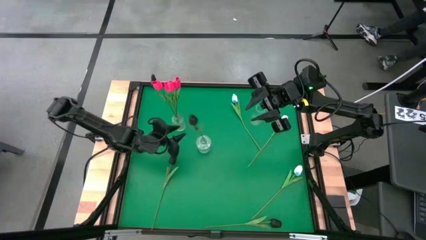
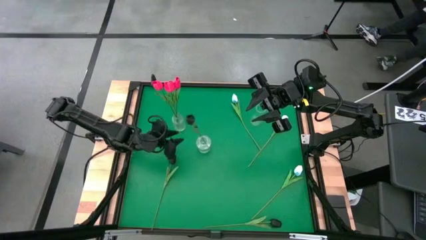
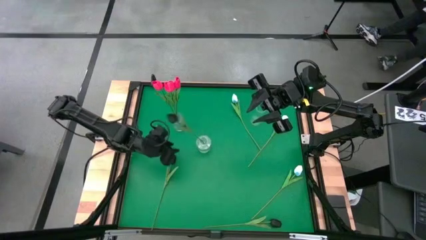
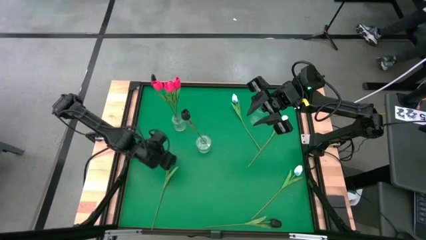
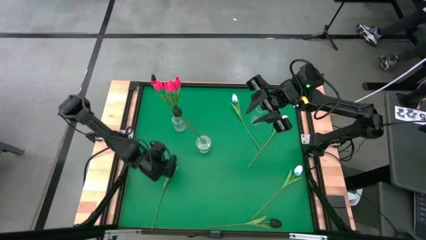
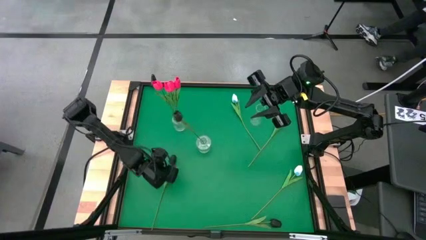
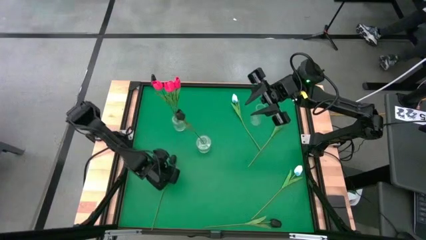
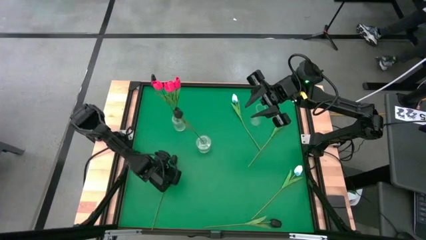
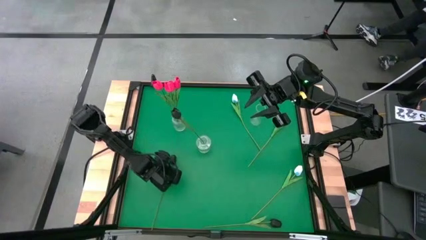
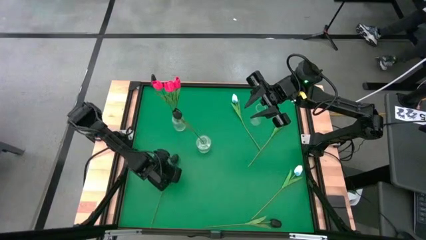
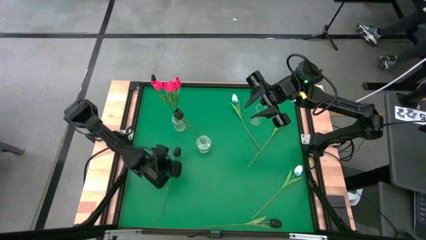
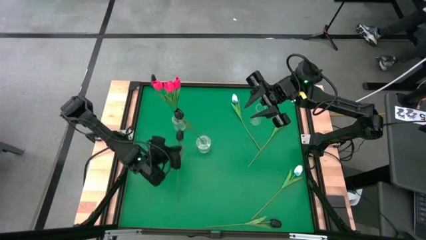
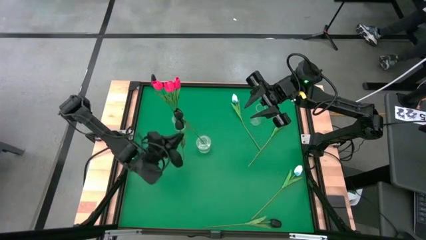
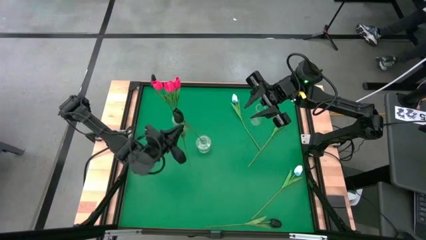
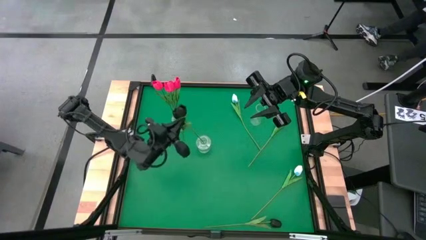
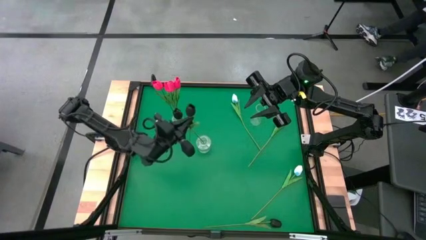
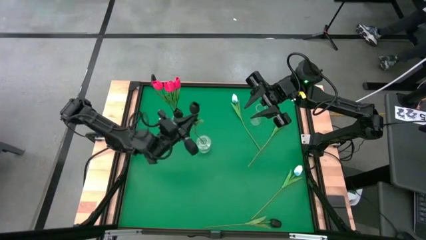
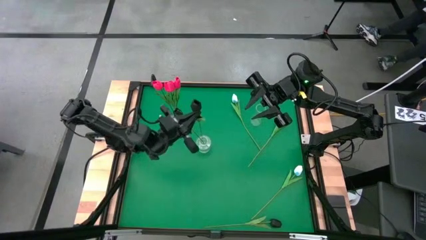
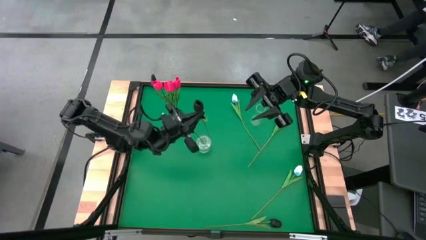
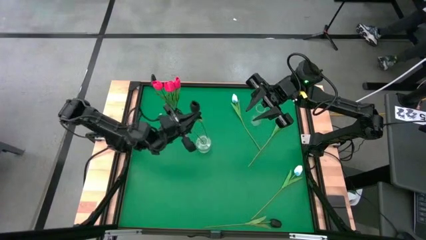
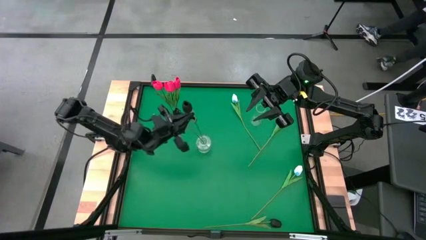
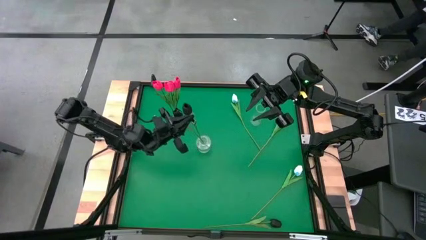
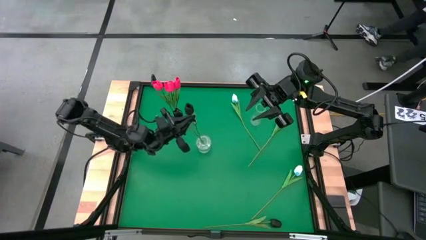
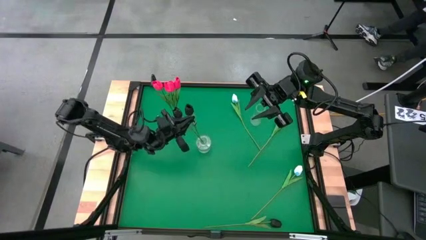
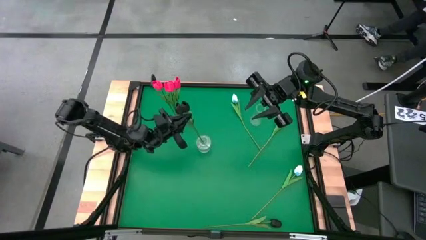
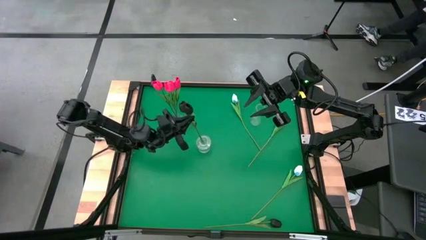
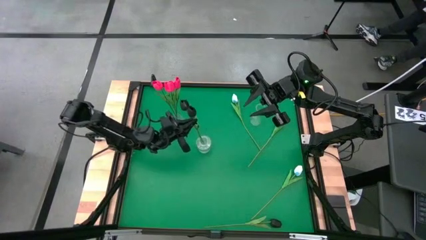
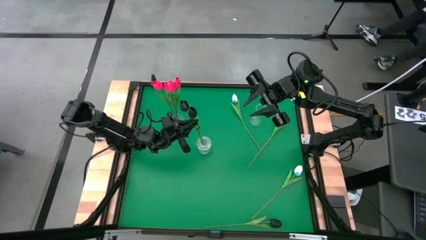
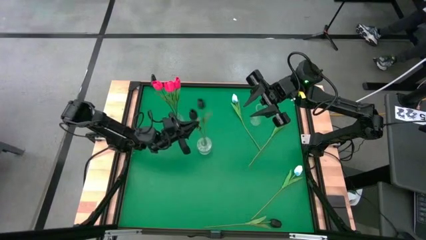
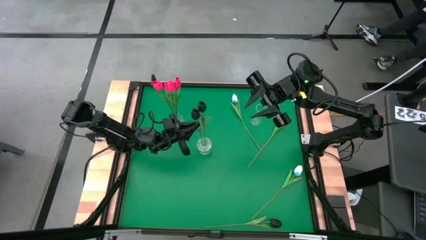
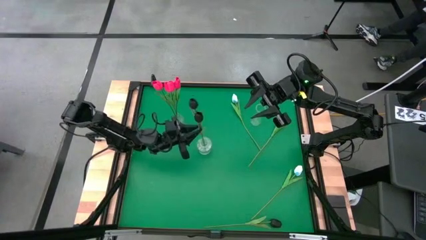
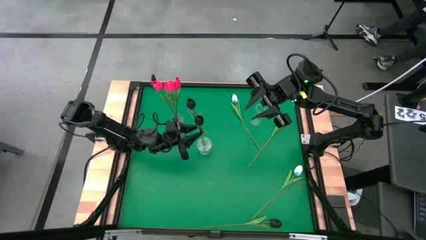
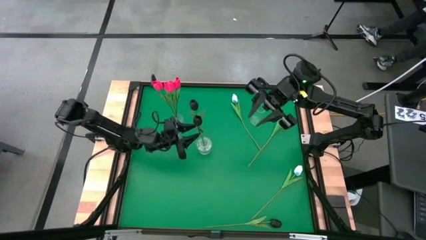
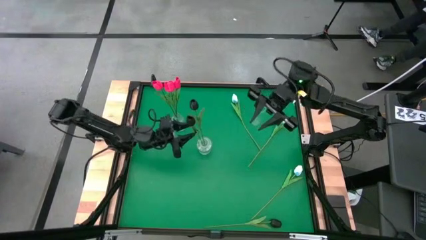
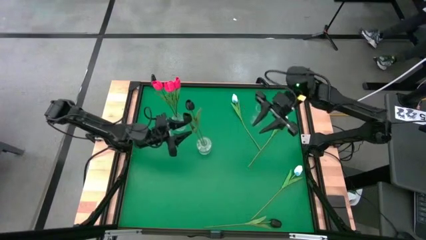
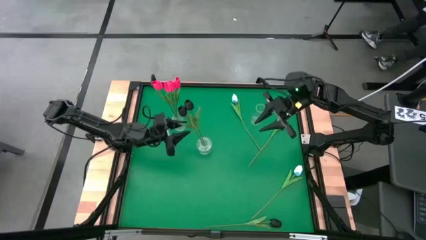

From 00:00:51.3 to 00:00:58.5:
Task: Sort flowers into vase by color
Put the left black tulip into the middle transparent vase
